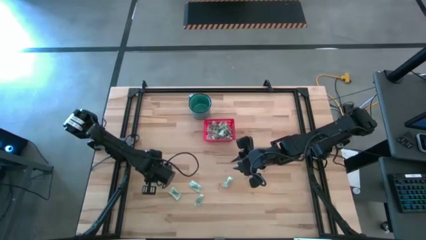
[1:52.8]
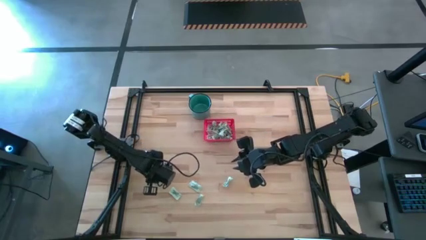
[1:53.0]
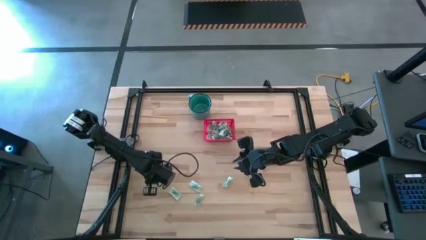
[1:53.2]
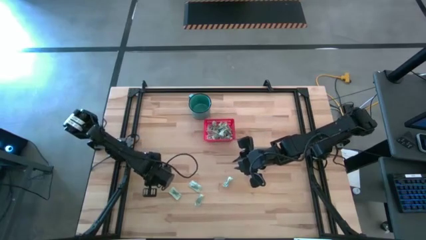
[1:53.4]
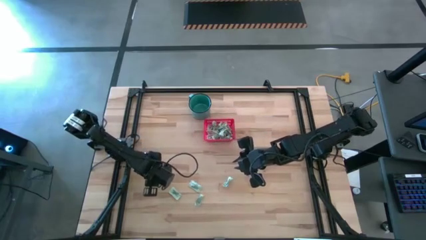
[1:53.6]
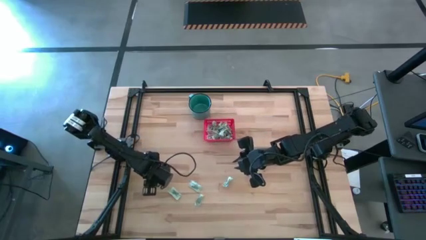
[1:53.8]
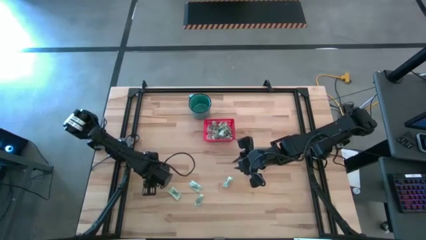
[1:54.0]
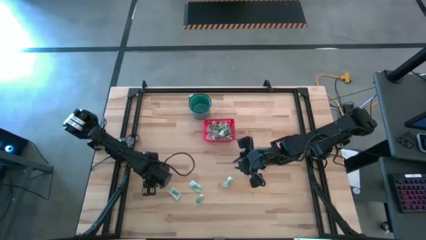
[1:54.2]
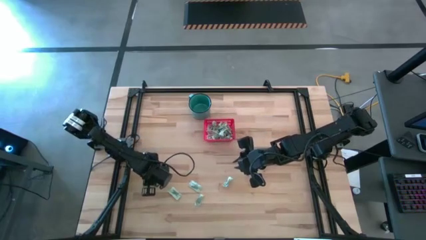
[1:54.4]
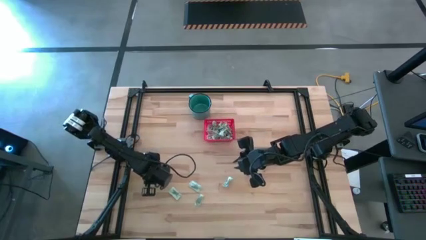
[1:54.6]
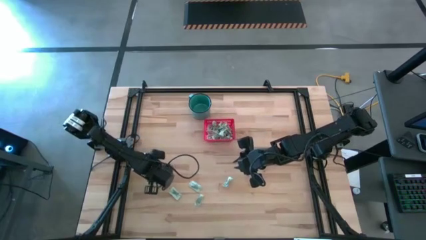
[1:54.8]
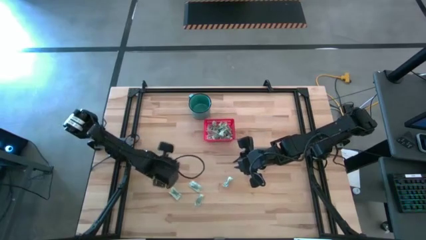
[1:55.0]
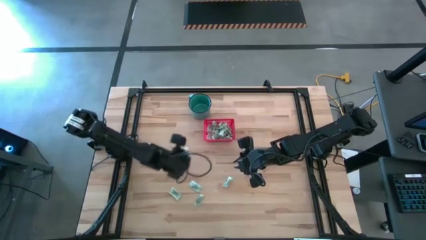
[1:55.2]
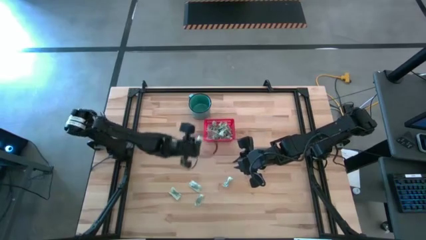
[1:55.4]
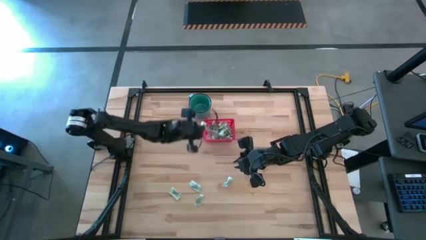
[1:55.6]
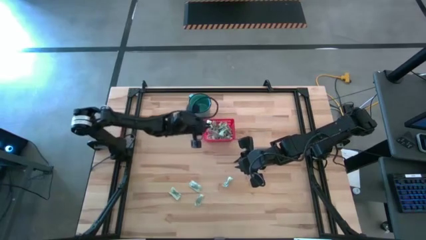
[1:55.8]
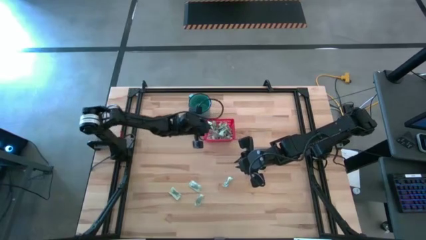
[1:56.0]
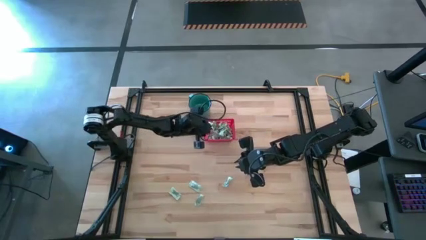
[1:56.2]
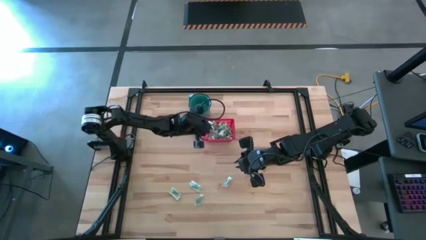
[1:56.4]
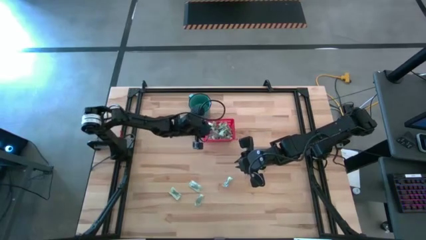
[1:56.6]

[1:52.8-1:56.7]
Task: Pick and place items into bin
Put the light green stevia packet into the red bin

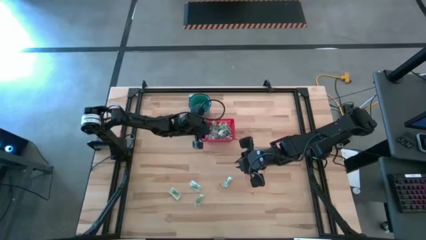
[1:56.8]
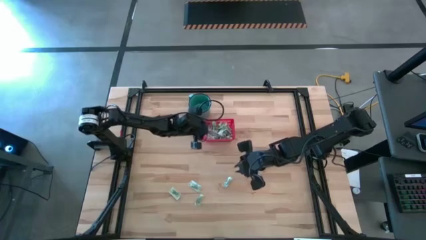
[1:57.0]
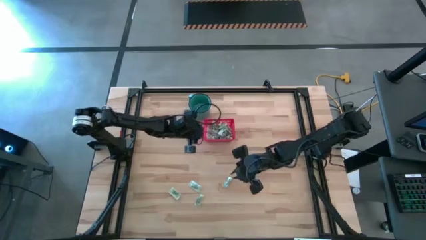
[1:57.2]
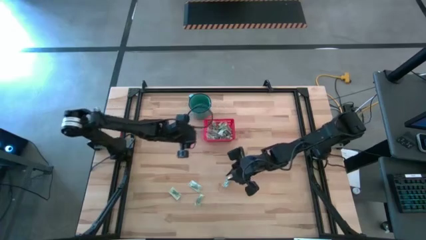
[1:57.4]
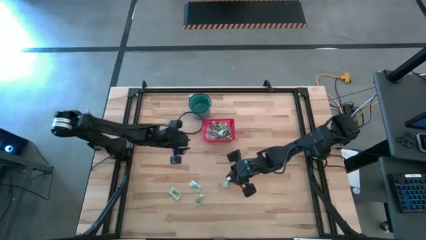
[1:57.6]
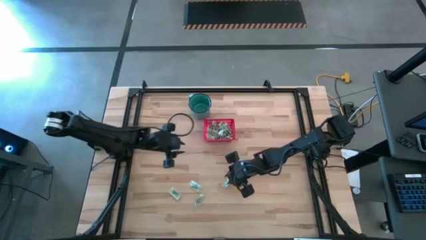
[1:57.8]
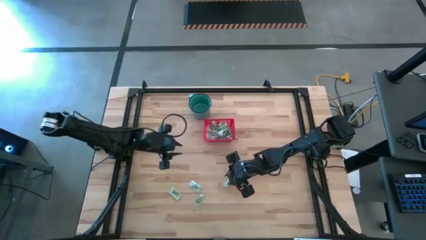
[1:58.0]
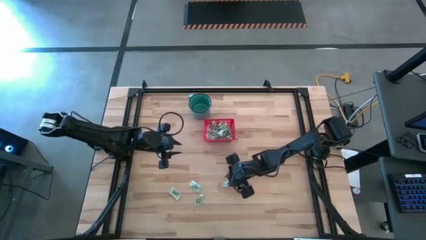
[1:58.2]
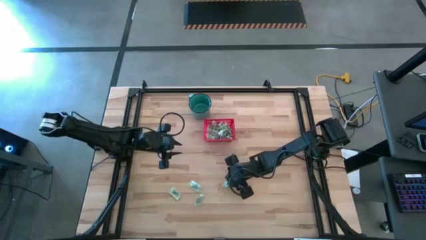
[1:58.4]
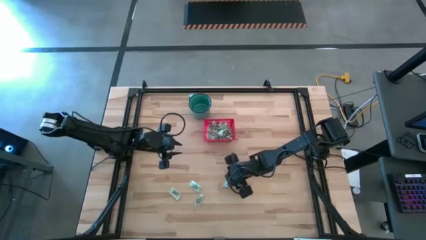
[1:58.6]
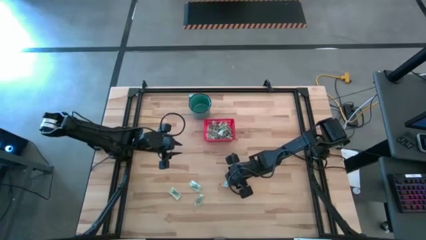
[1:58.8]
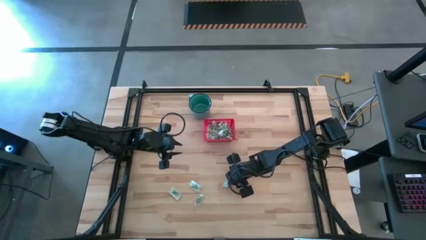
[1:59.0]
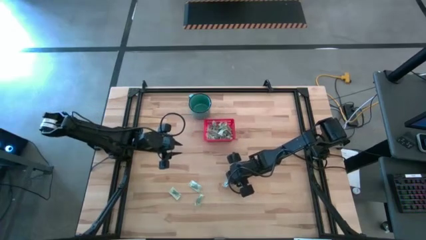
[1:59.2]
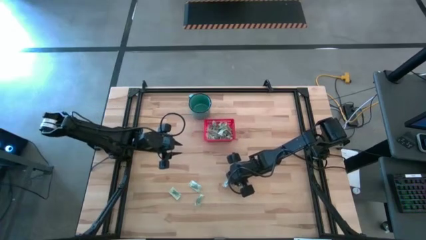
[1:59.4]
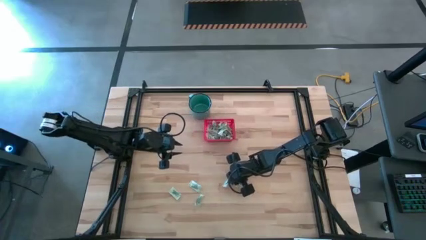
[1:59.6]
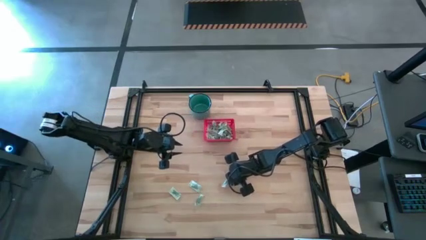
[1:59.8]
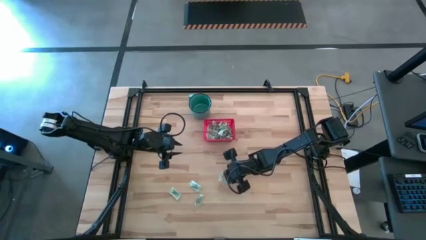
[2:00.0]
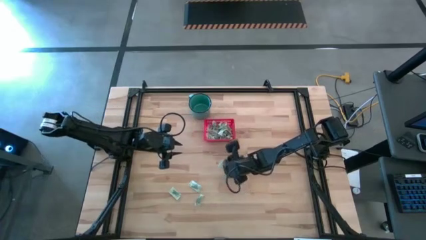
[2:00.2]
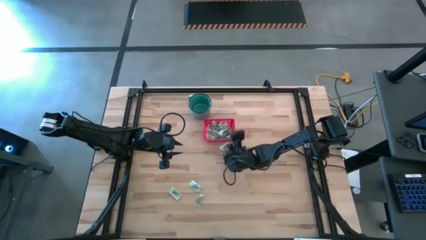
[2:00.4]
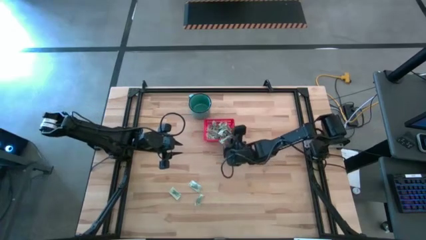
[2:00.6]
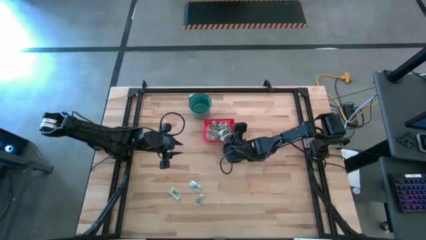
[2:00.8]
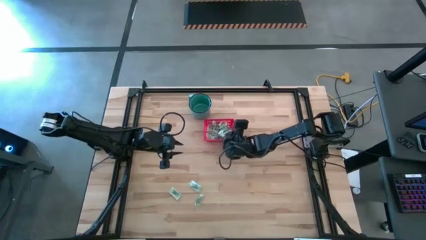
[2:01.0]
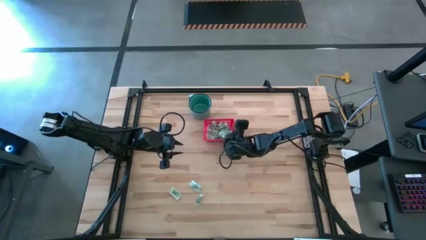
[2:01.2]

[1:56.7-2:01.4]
Put the light green stevia packet into the red bin

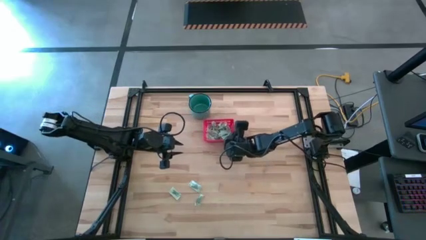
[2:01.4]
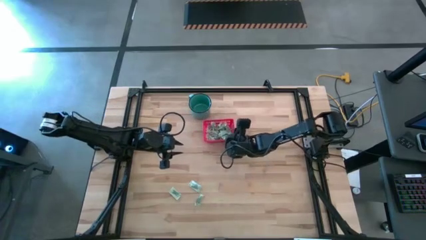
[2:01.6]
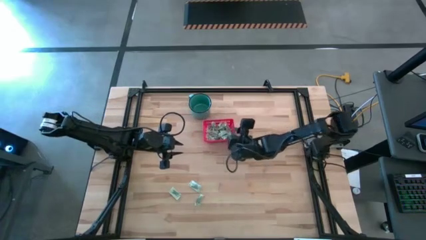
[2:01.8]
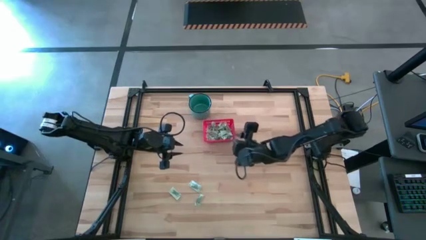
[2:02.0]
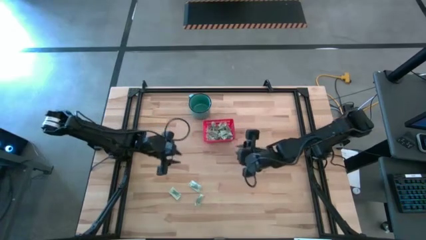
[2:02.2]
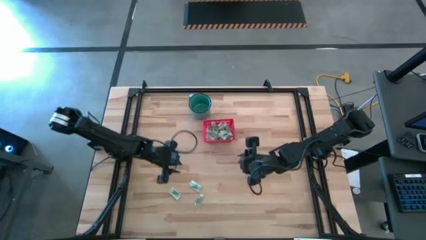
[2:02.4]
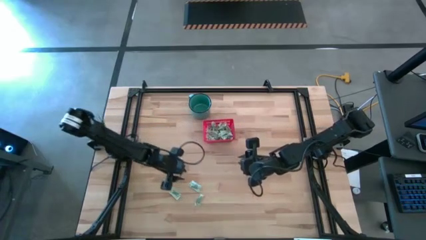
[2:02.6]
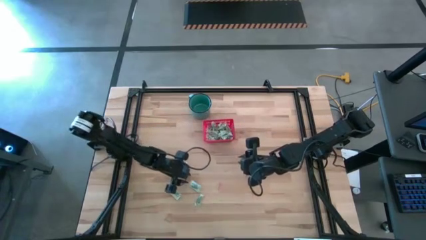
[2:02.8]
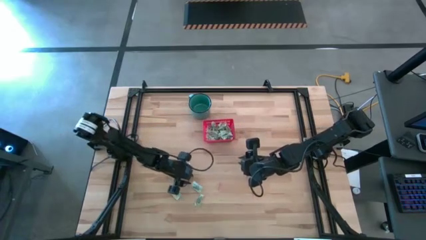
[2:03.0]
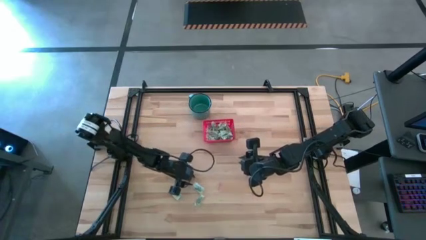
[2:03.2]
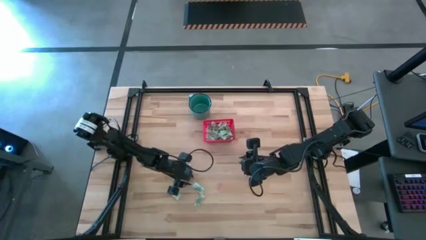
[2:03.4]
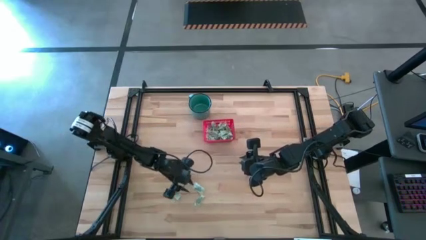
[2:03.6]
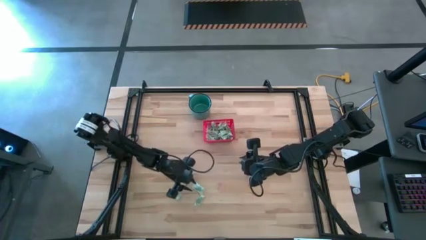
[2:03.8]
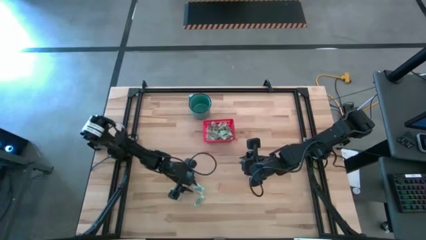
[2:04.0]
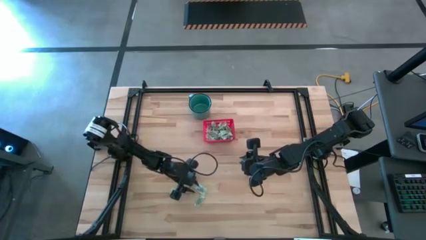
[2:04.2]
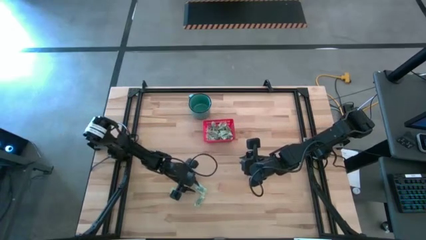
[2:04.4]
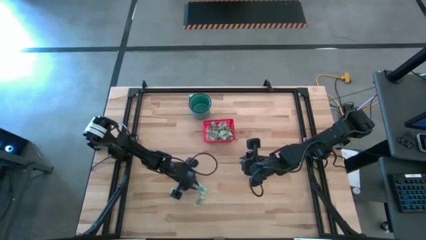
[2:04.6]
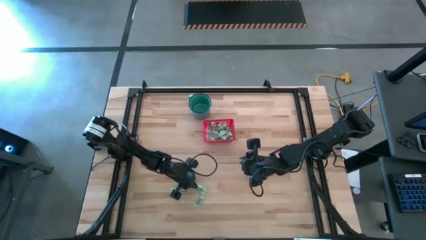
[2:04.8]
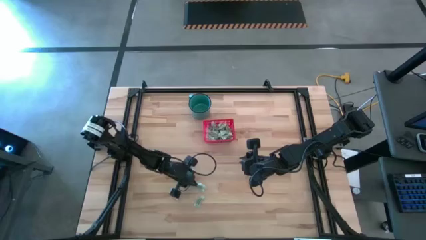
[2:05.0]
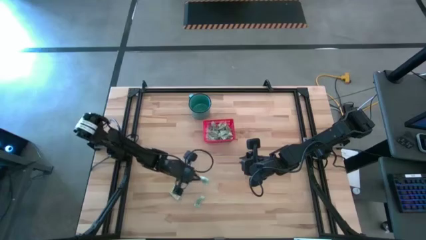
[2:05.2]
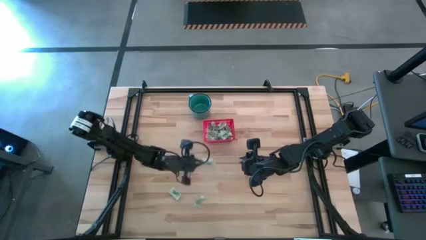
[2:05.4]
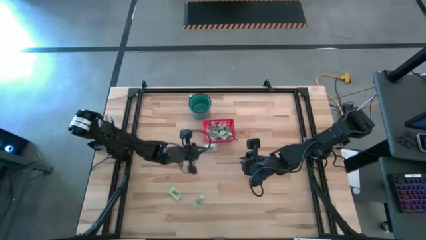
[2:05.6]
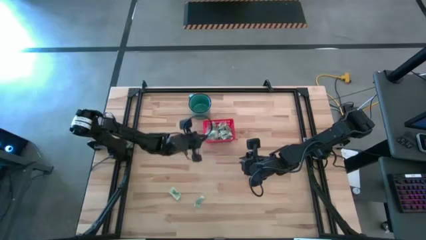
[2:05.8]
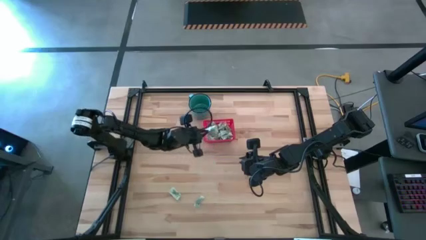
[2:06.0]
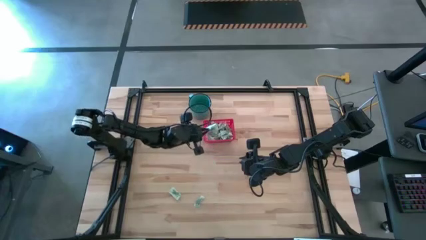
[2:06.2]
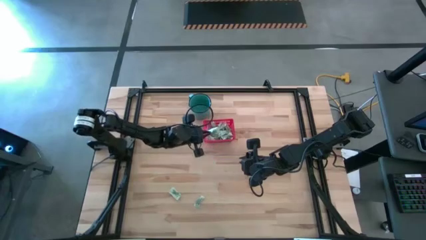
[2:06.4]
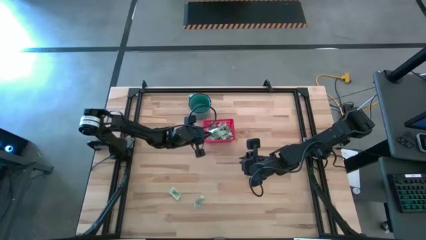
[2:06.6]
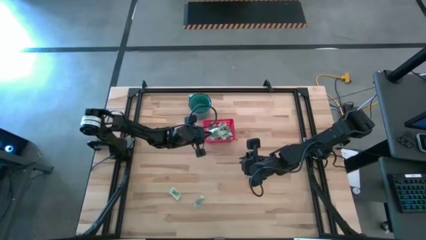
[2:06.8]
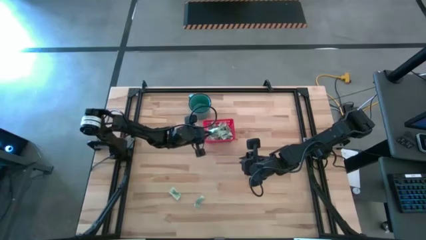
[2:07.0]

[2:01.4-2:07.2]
Put the light green stevia packet into the red bin

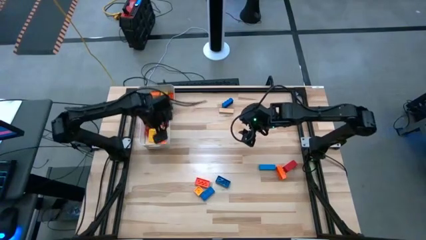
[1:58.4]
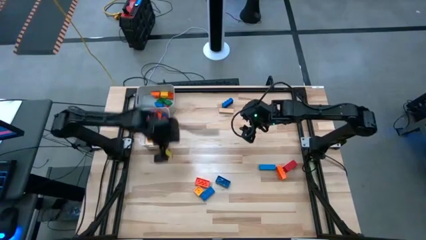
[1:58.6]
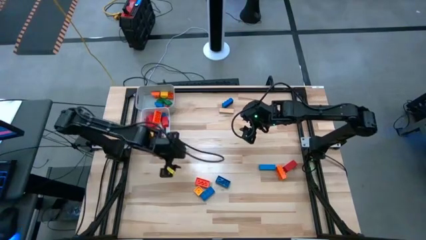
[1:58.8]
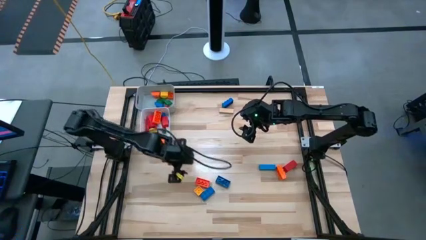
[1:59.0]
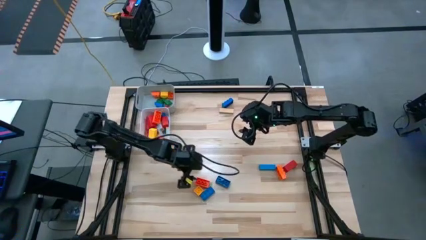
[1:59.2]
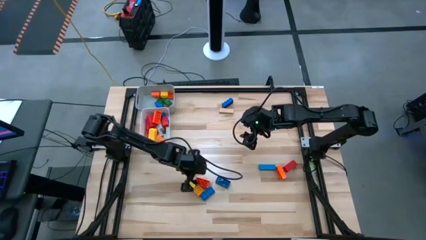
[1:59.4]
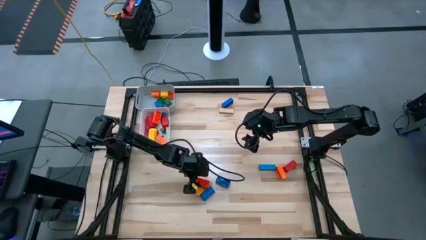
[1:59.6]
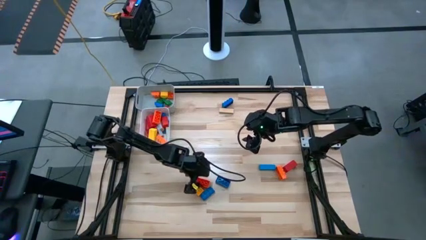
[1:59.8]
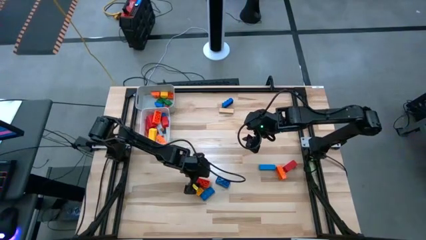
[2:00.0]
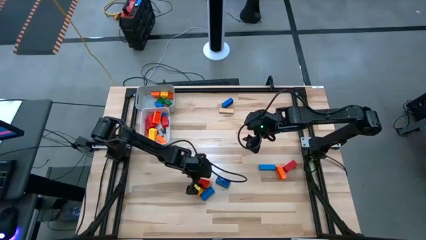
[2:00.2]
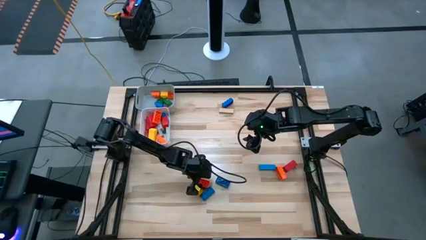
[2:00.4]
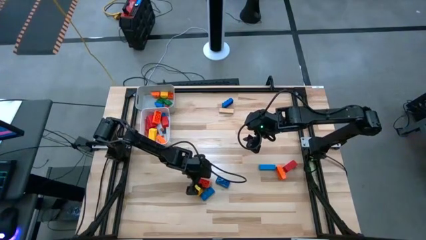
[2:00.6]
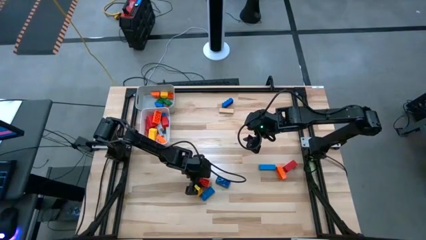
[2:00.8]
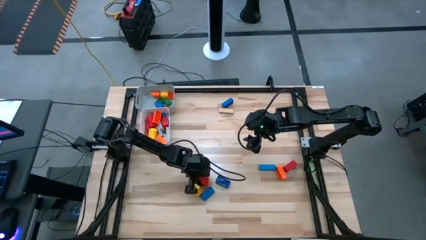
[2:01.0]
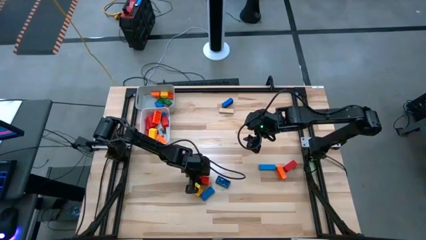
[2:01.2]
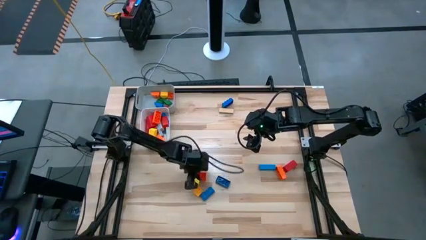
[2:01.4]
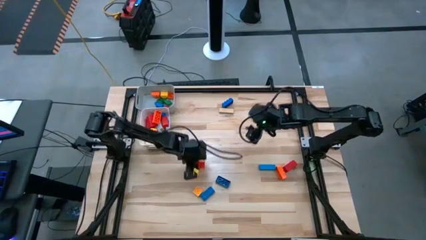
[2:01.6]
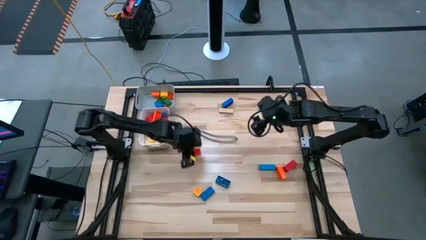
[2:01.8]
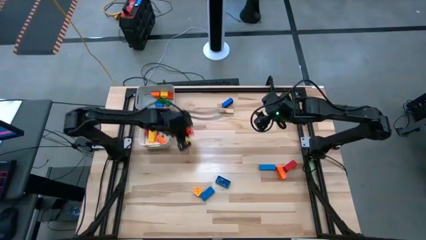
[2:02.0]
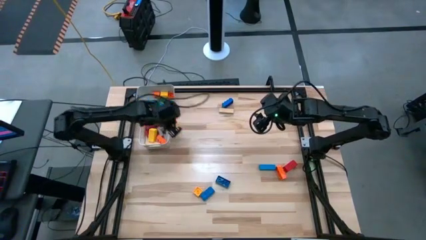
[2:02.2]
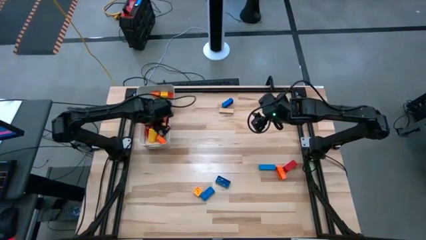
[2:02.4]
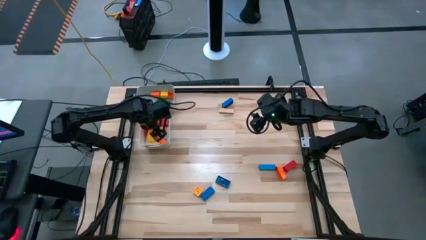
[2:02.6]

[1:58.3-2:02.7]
Task: Sort blocks by size
Put the large orange game piece into the white bin
